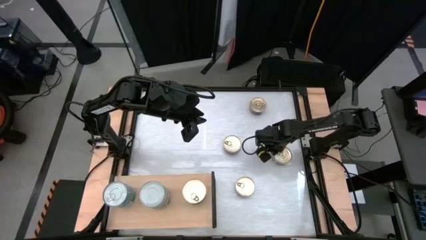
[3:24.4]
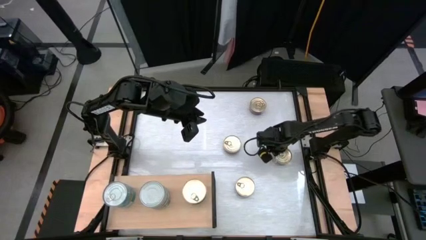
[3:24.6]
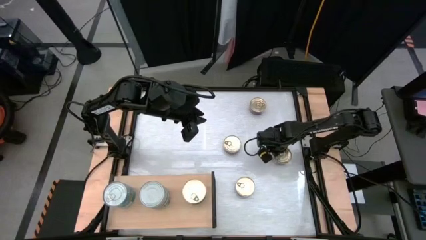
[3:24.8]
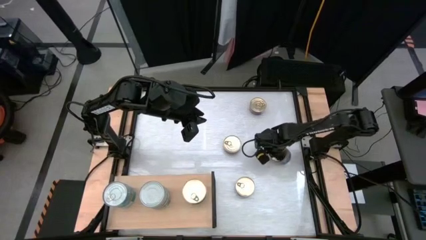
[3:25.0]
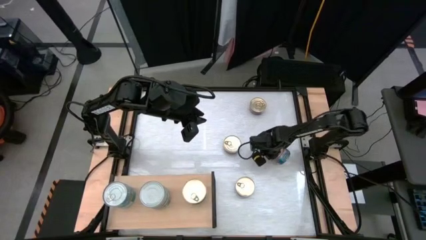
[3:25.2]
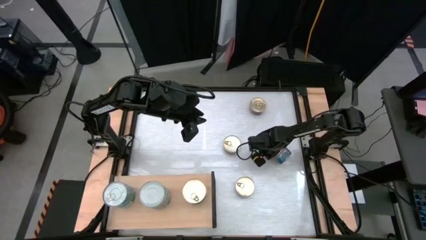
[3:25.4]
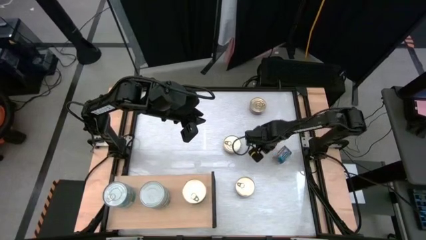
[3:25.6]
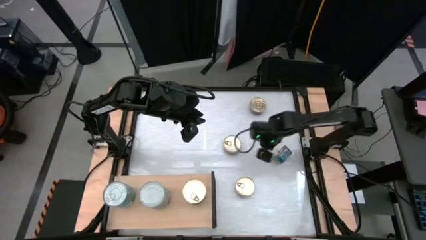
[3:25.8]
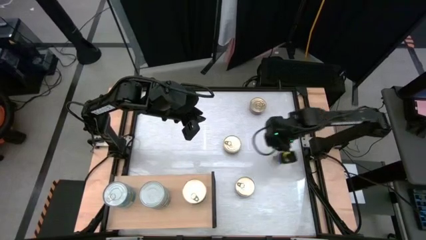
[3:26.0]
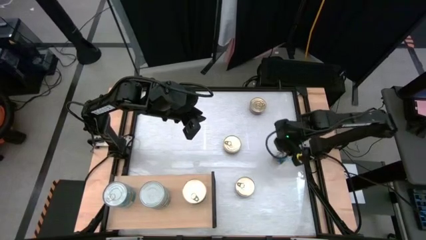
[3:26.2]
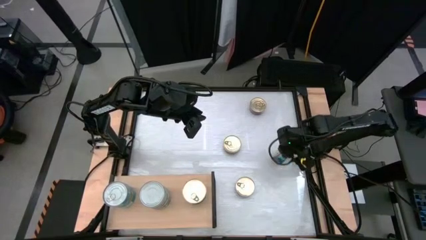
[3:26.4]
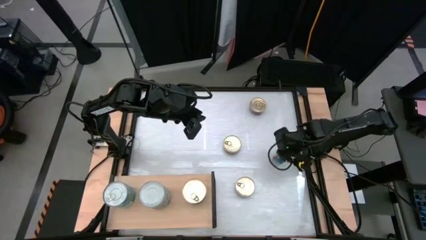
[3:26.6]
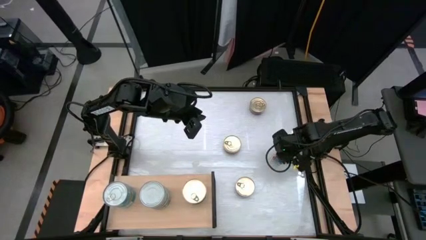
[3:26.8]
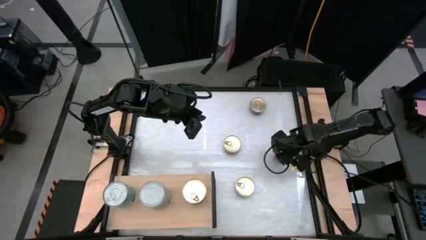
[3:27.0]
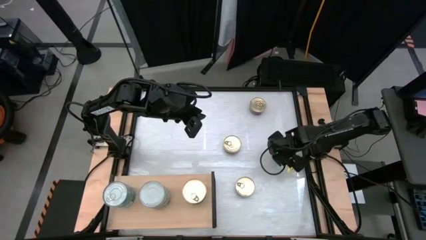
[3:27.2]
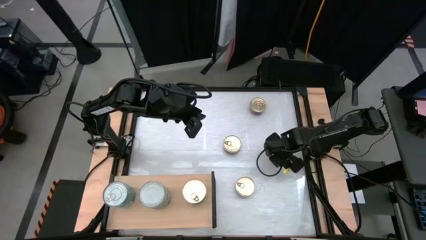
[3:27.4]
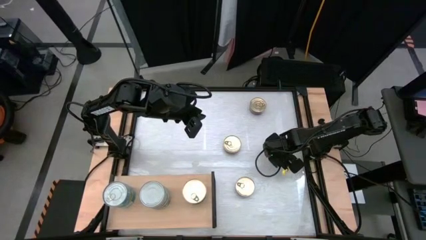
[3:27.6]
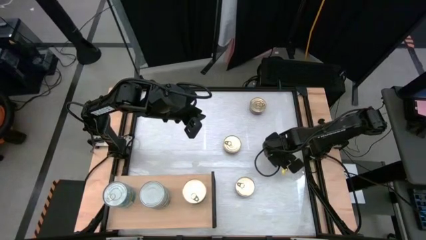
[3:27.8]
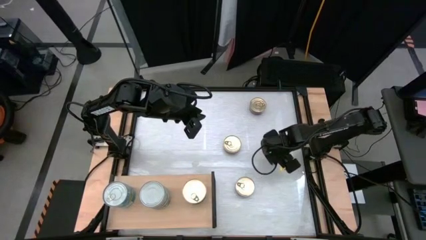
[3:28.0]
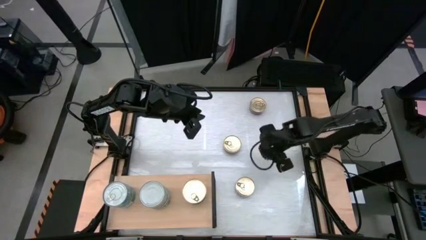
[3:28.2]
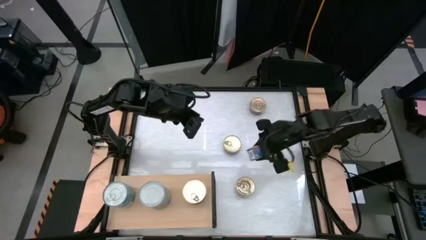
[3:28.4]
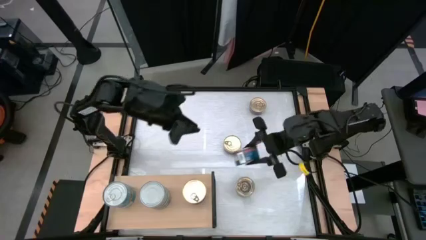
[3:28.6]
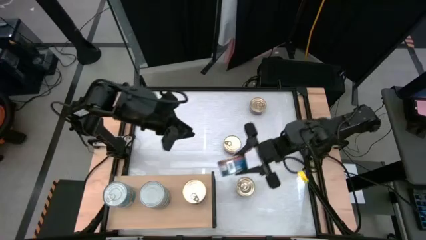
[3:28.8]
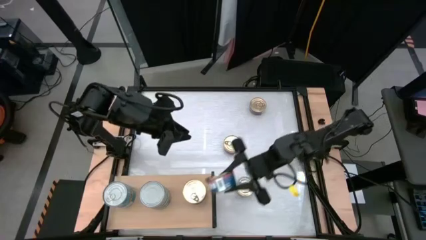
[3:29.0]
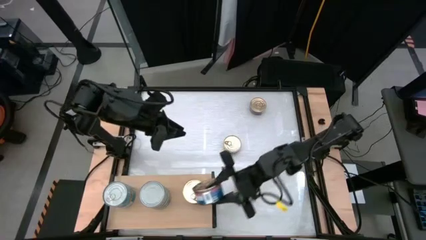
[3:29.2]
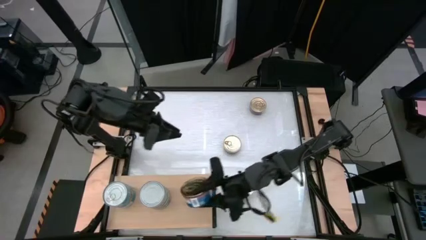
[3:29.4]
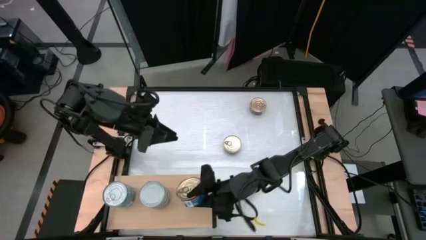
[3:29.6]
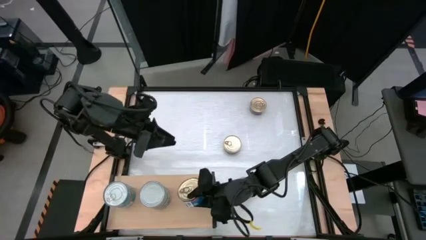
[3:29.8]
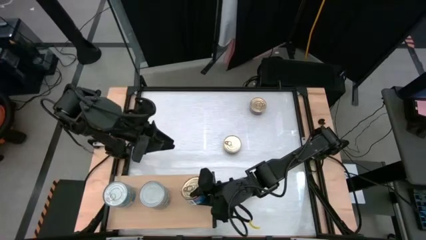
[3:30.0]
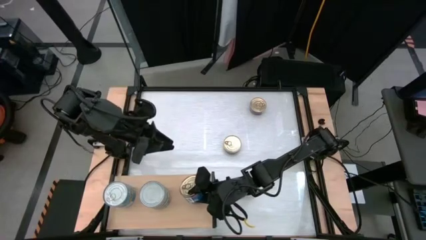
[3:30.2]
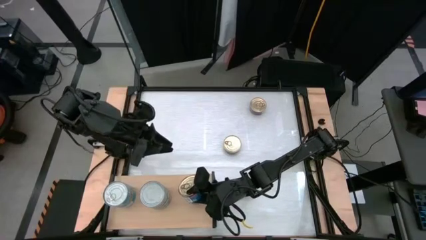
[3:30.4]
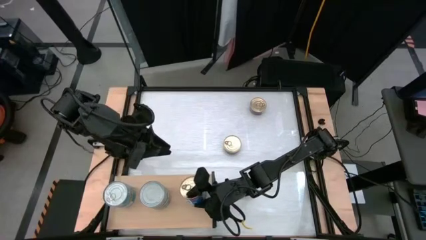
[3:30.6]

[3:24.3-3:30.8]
Task: Stack canned seafood by type on shelf
Stack the blue pink tuna can on top of the blue pink tuna can on the shelf

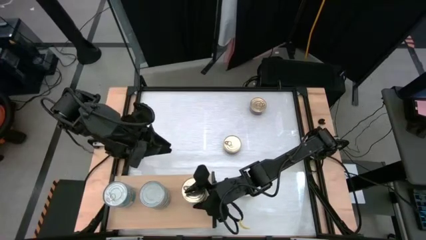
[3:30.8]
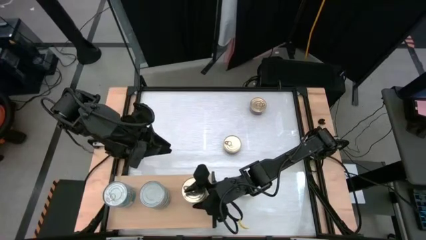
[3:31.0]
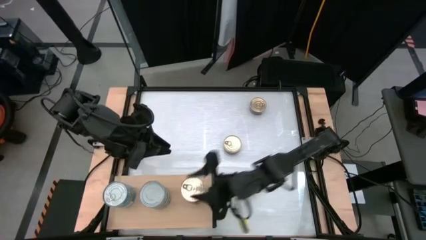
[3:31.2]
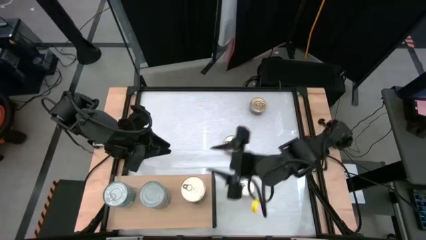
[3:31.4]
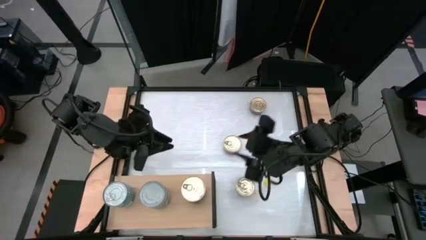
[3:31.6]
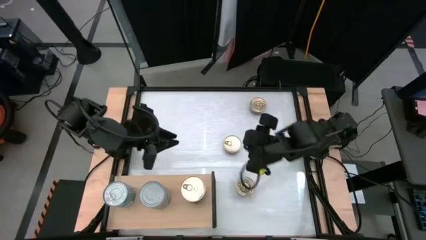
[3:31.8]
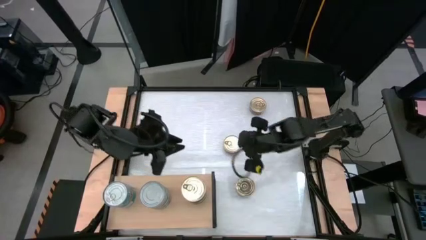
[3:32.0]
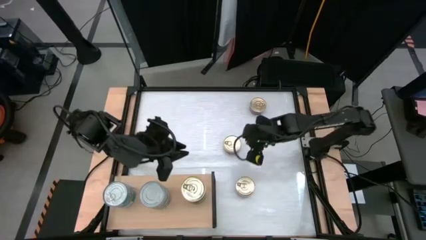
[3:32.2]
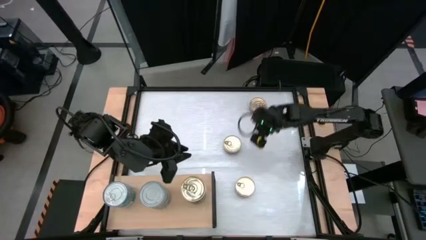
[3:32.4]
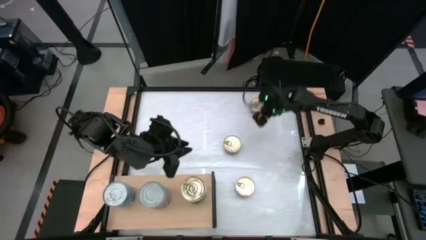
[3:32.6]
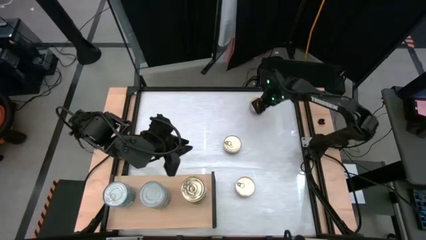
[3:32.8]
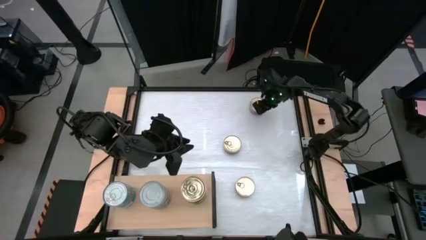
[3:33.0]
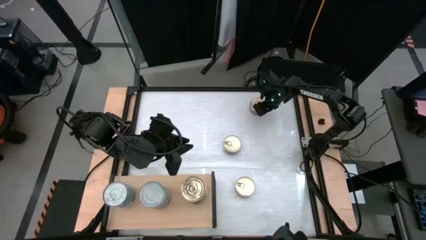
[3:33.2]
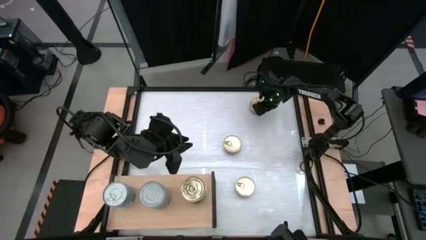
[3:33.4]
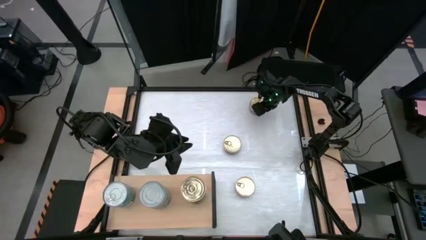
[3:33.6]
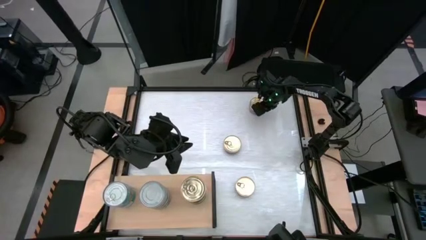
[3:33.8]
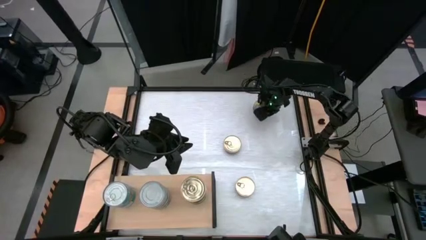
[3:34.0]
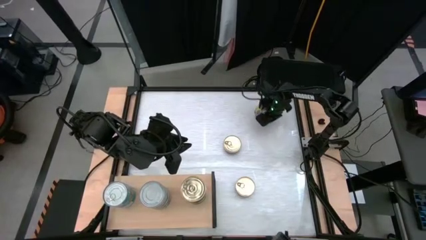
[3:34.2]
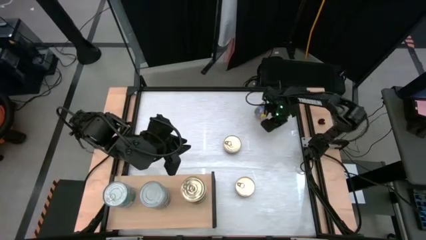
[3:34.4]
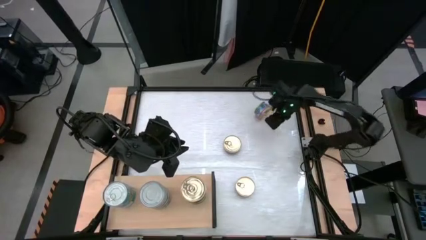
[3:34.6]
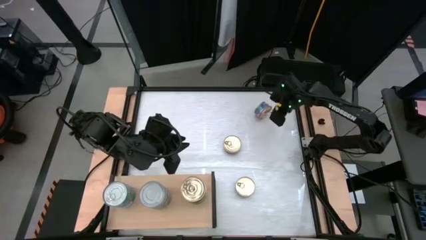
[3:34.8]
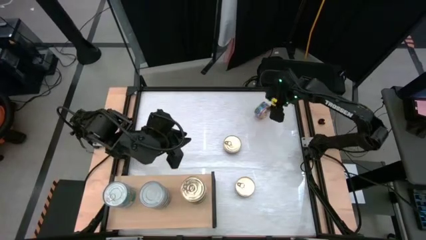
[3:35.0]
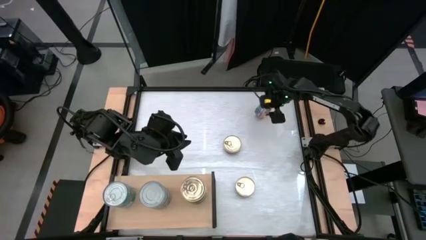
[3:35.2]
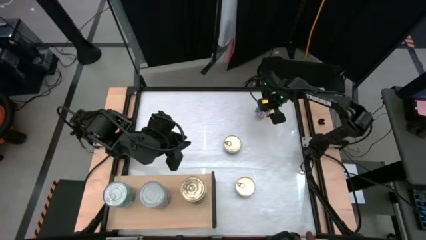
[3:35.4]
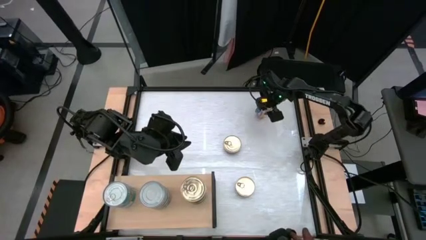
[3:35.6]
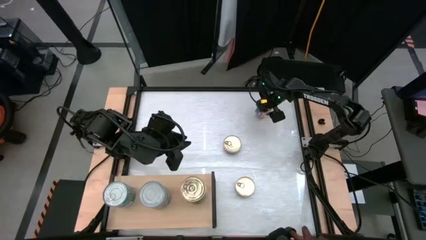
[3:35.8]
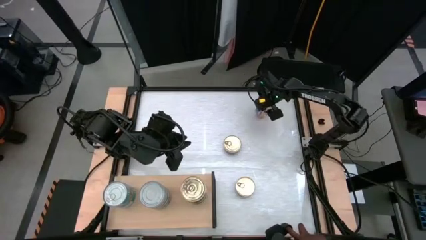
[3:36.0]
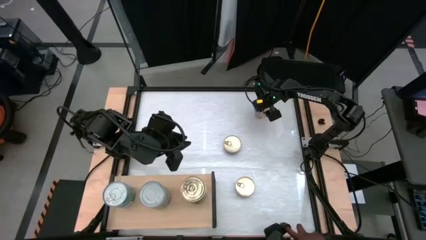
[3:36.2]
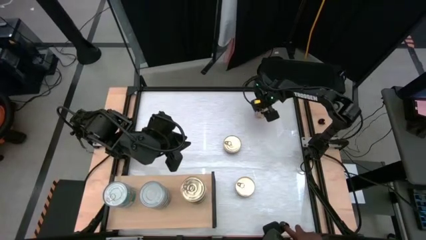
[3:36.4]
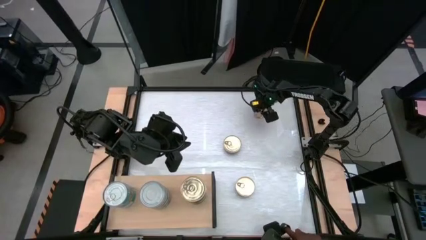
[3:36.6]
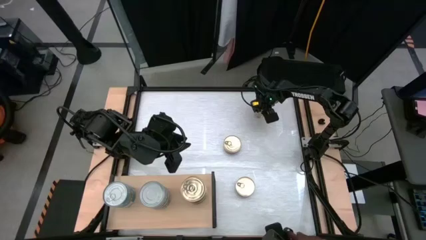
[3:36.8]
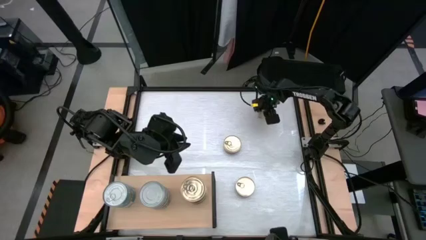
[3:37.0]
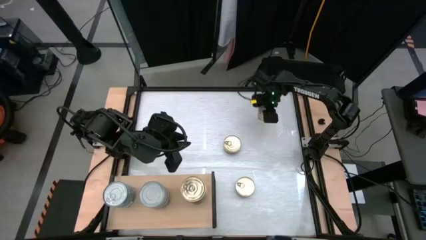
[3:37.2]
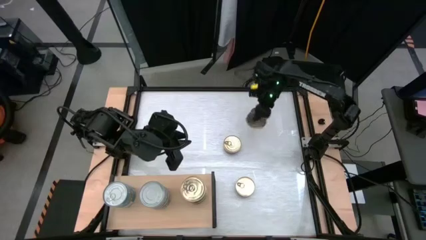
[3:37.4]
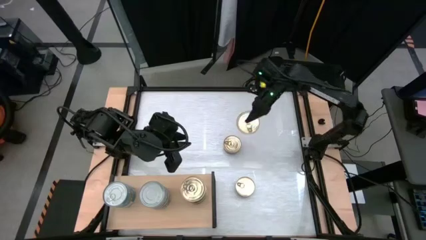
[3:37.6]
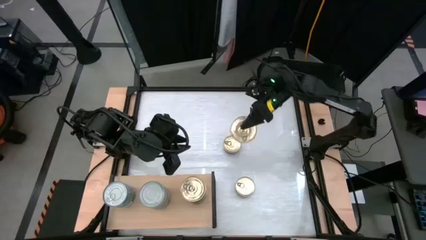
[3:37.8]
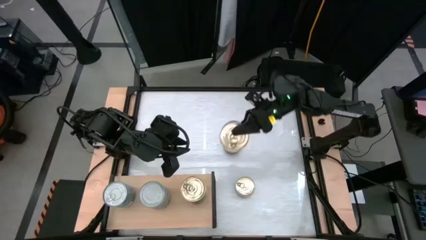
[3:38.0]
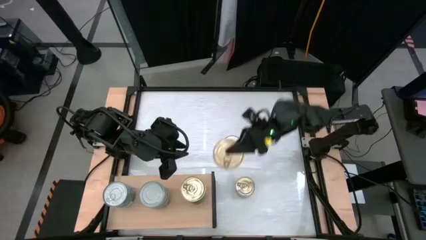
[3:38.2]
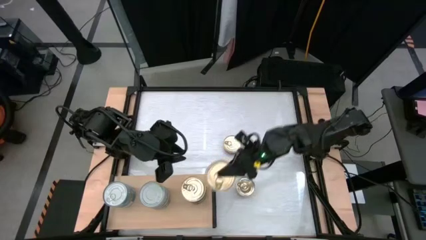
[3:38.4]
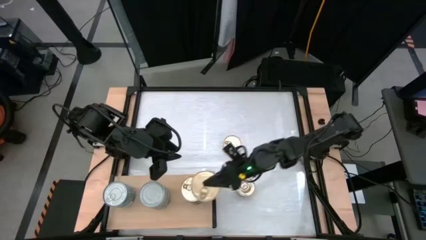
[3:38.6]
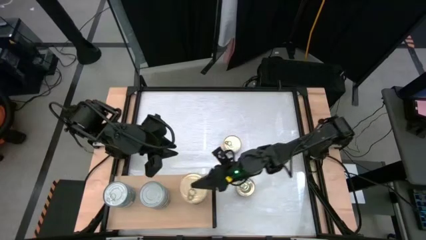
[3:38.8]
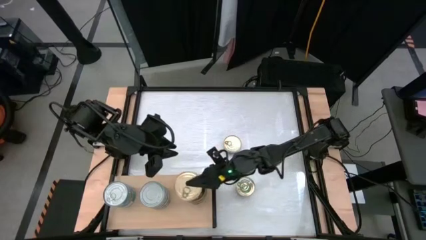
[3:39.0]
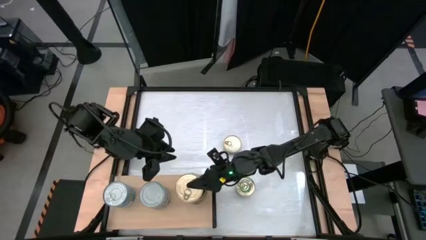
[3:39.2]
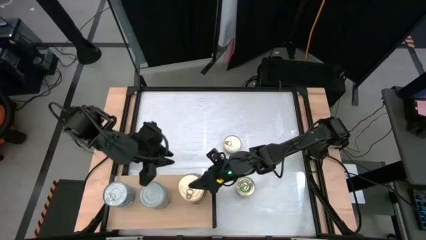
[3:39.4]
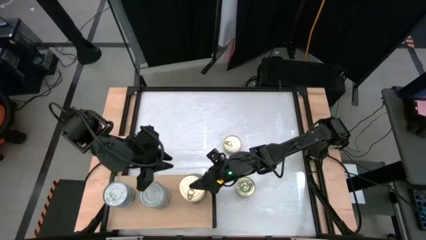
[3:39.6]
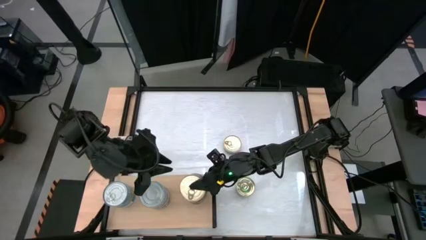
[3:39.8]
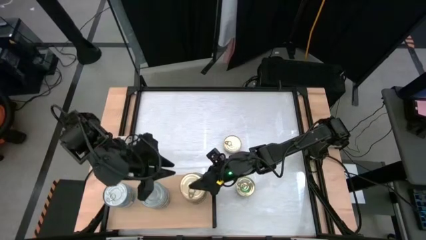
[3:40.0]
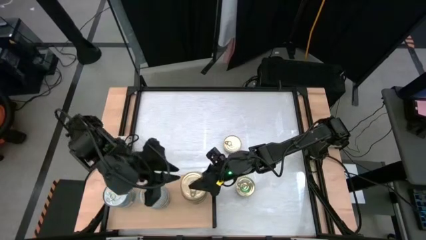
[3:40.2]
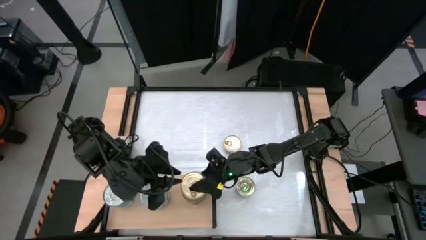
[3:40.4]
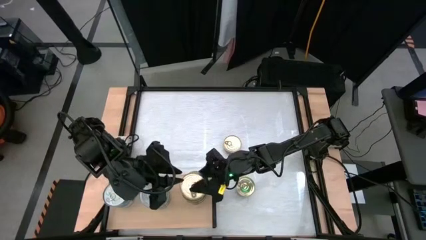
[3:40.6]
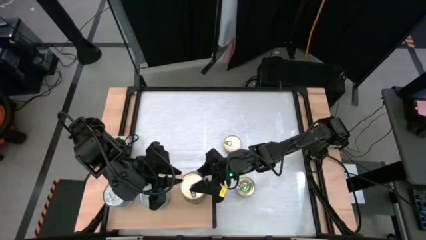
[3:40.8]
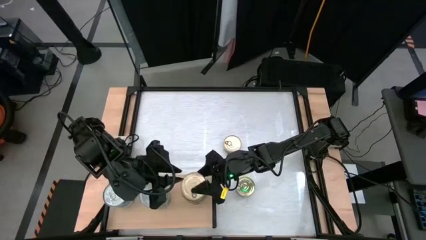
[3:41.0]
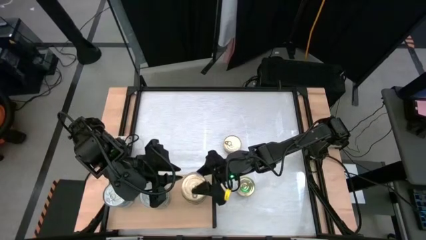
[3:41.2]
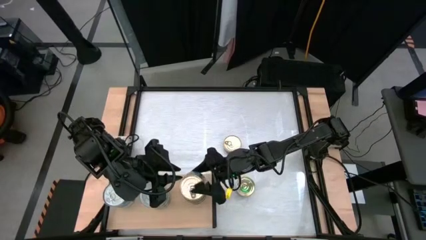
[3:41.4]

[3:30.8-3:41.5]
Stack the blue pink tuna can on top of the blue pink tuna can on the shelf
